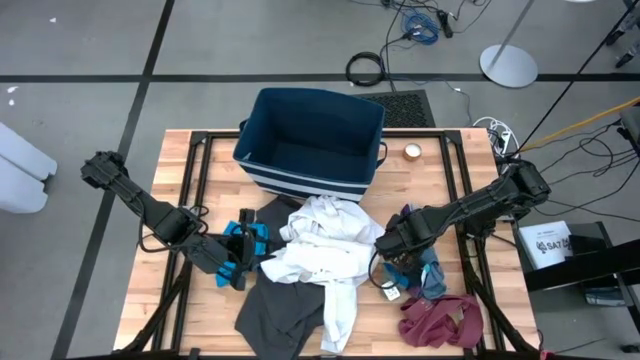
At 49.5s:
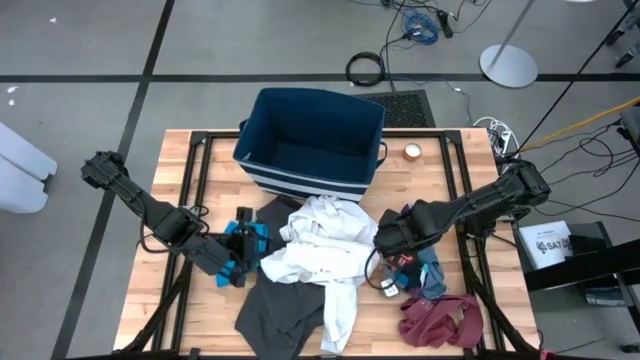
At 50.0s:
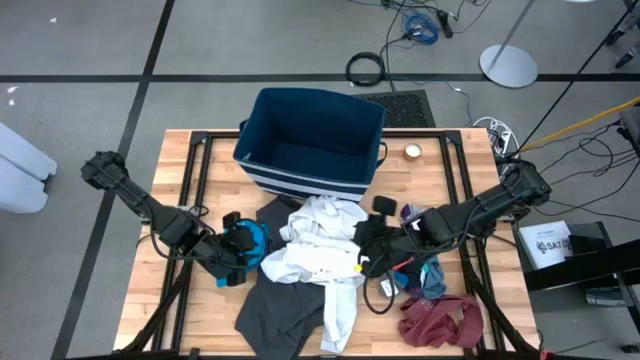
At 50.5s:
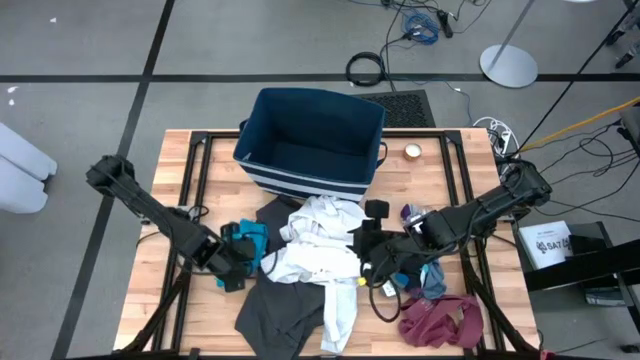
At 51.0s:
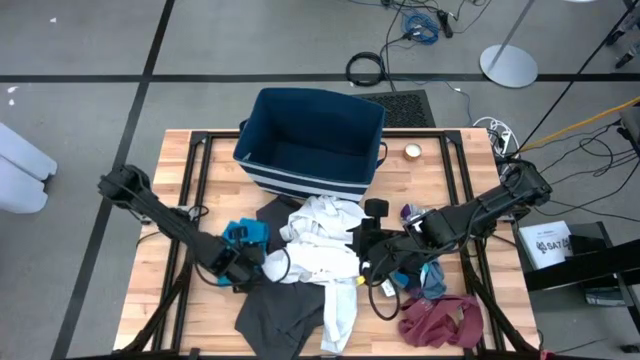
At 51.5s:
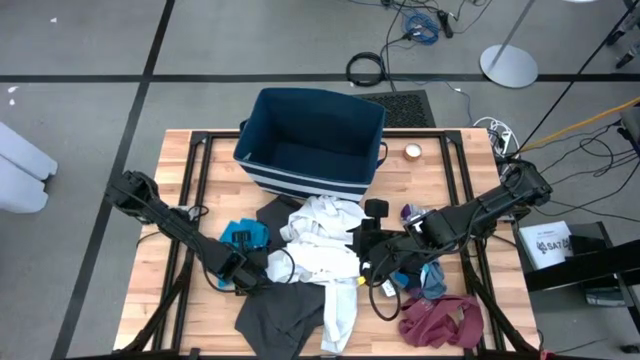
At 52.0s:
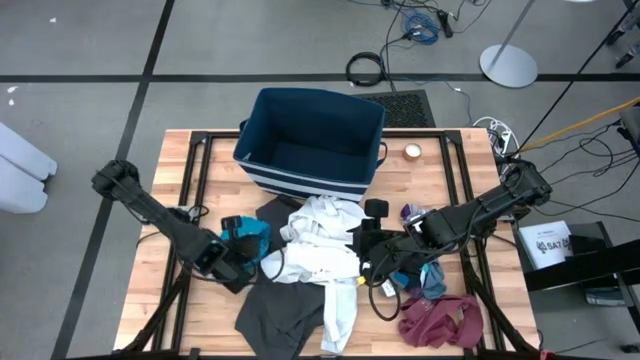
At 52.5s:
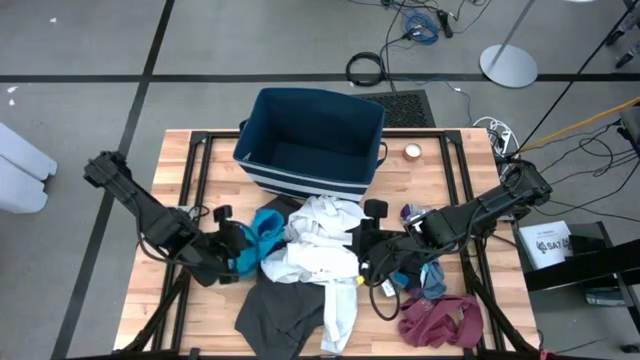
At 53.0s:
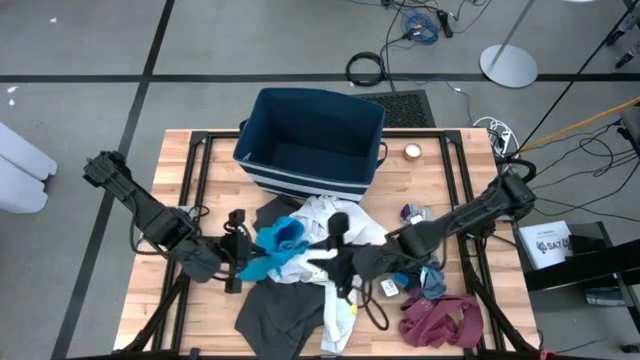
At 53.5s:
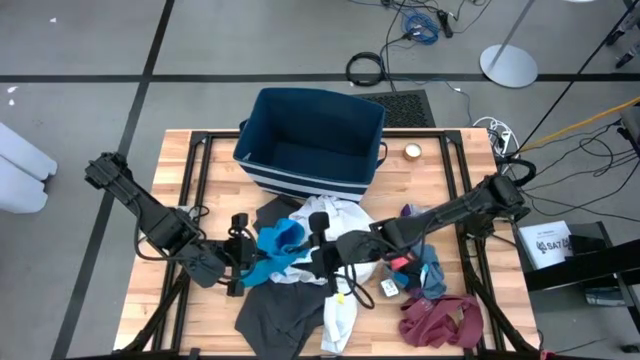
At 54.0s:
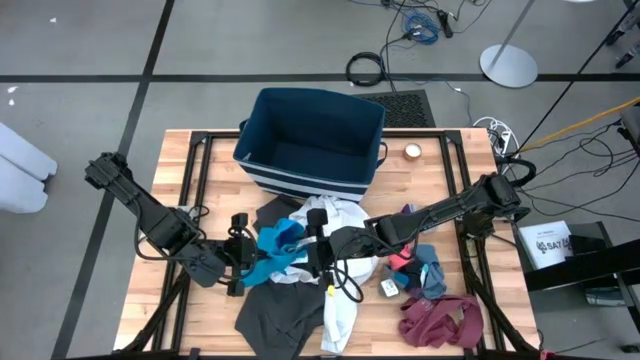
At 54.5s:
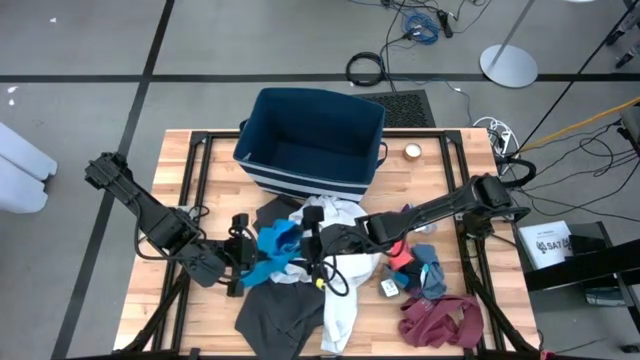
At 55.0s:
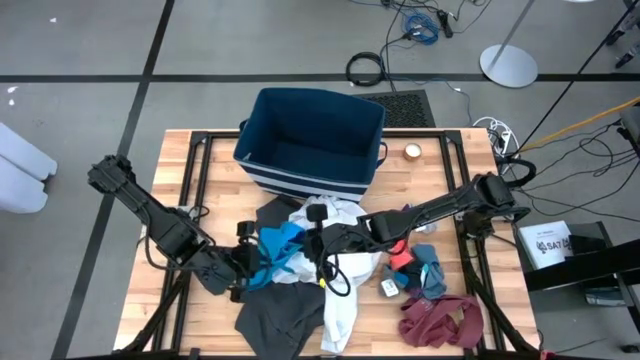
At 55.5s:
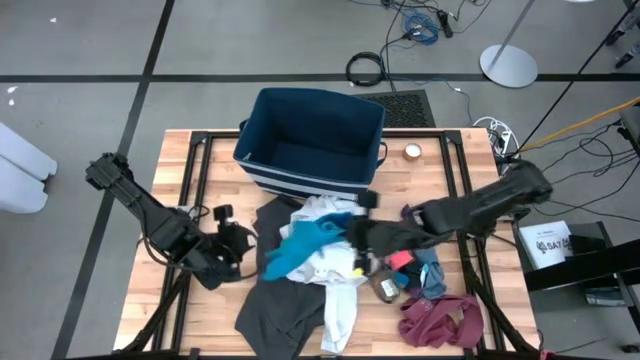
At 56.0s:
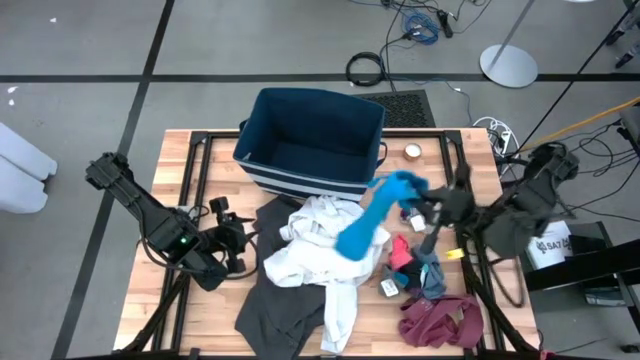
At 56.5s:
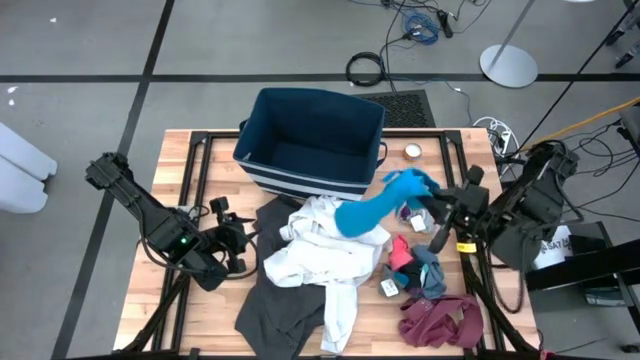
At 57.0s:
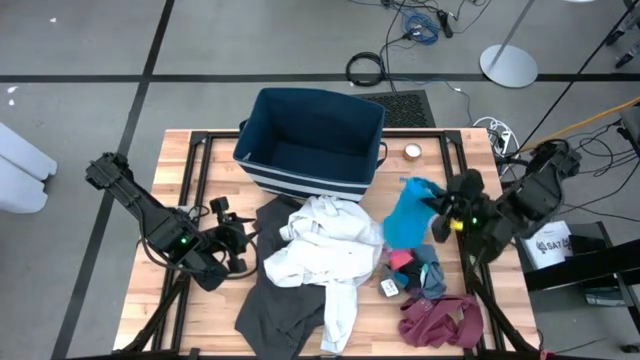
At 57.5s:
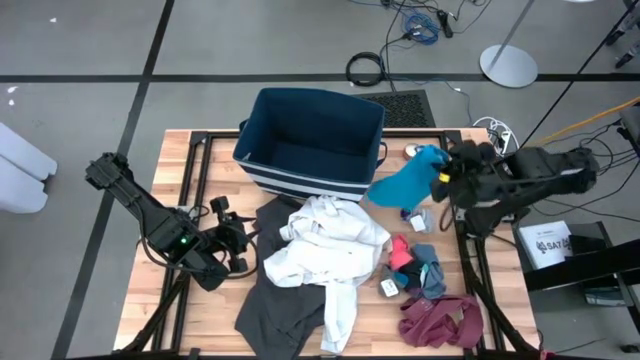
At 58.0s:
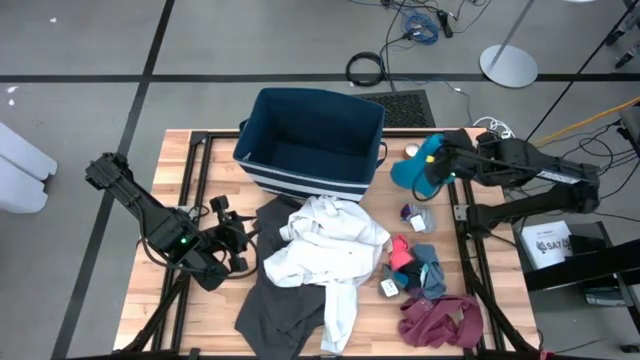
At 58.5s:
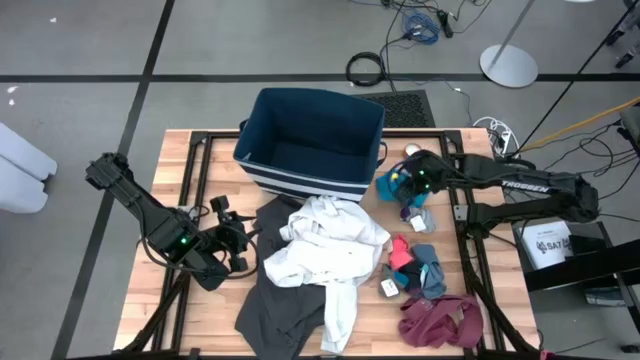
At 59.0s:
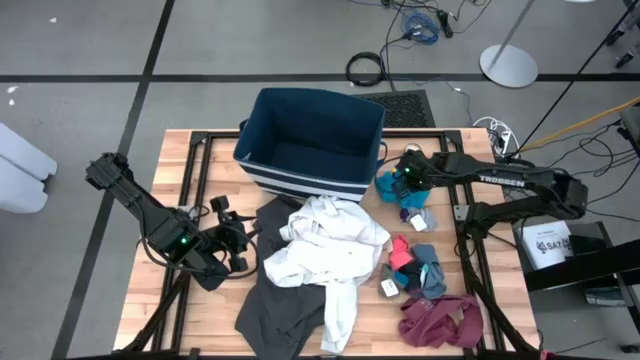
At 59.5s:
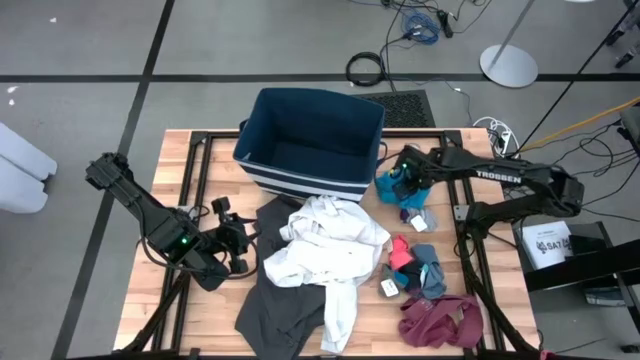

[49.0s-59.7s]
Task: Sort clothes
Move the blue short to the right of the table

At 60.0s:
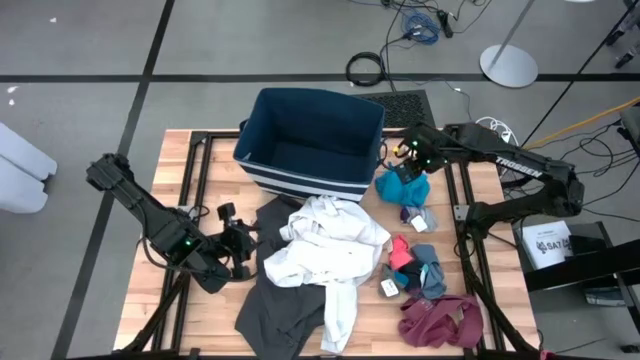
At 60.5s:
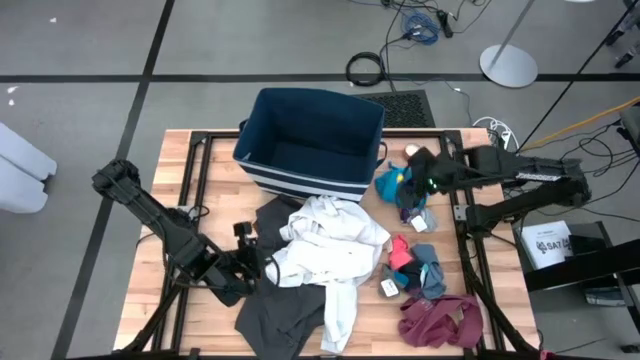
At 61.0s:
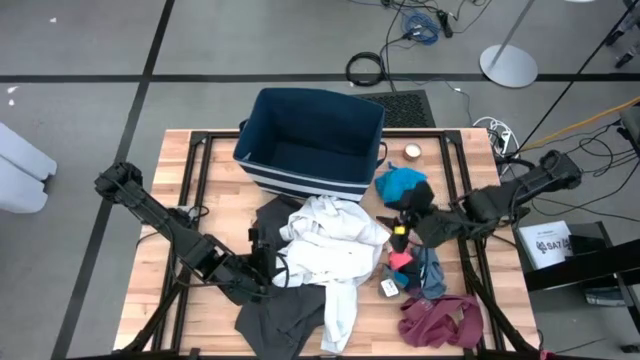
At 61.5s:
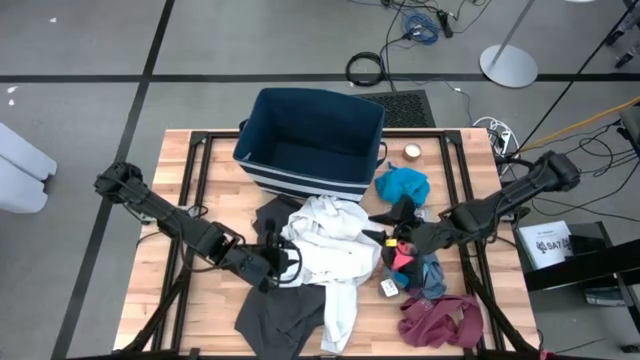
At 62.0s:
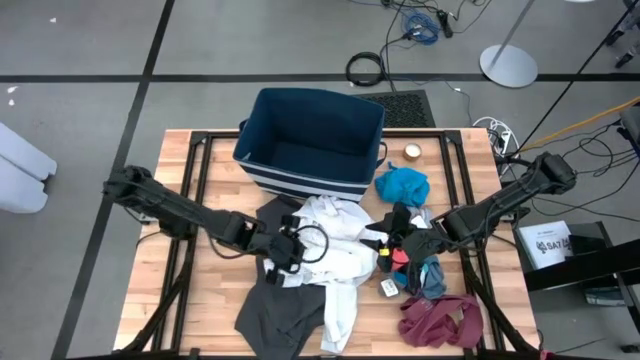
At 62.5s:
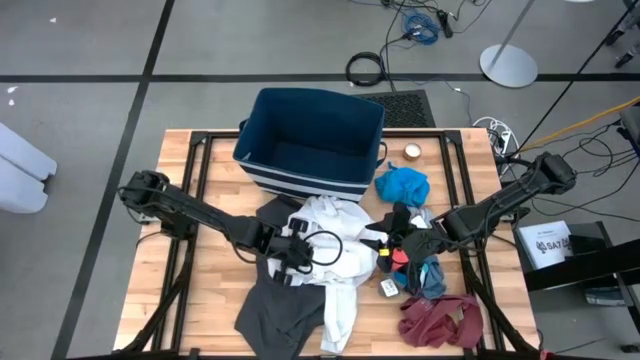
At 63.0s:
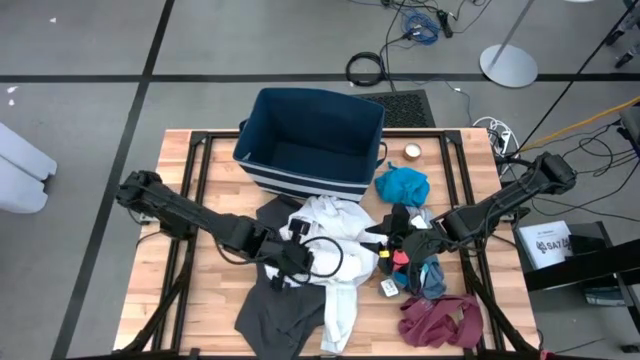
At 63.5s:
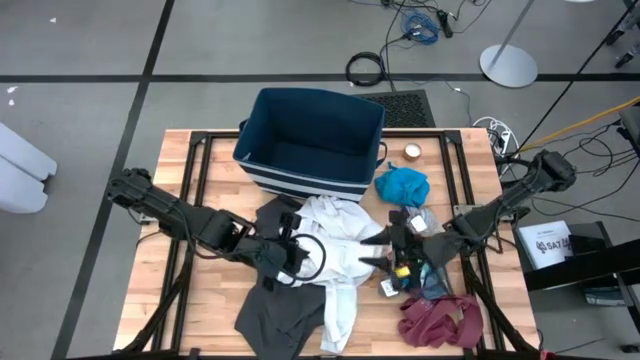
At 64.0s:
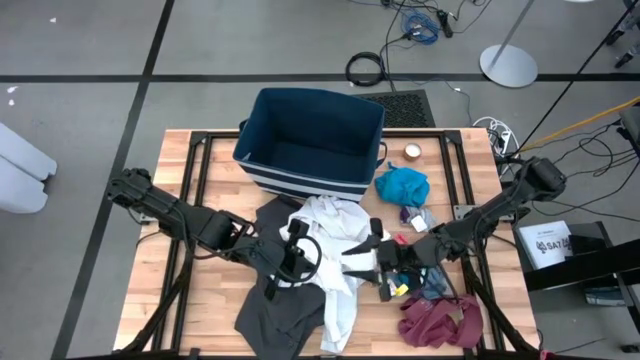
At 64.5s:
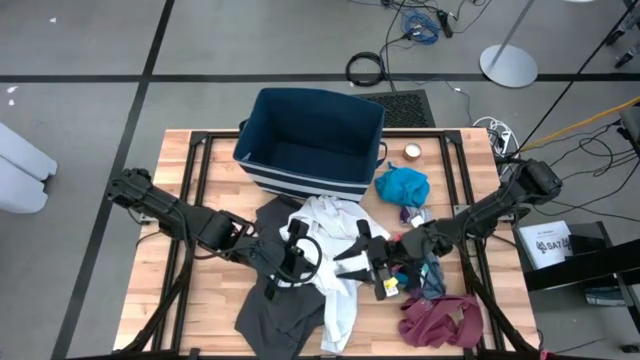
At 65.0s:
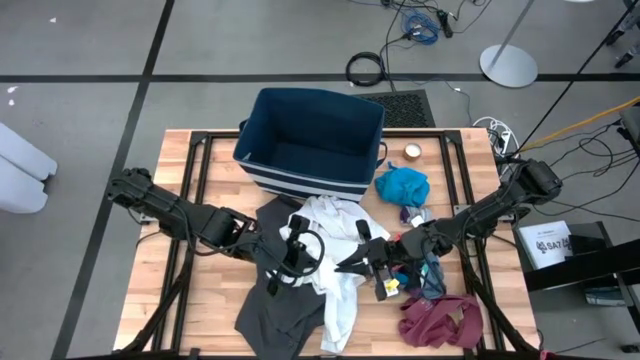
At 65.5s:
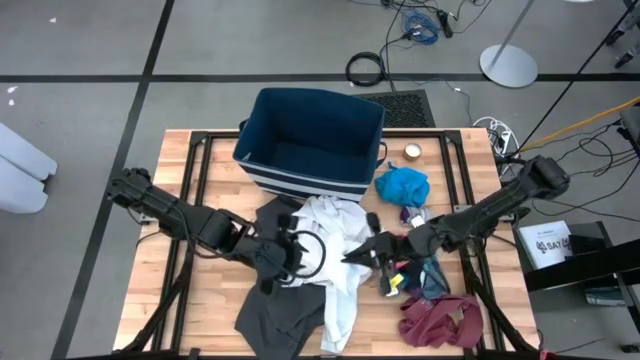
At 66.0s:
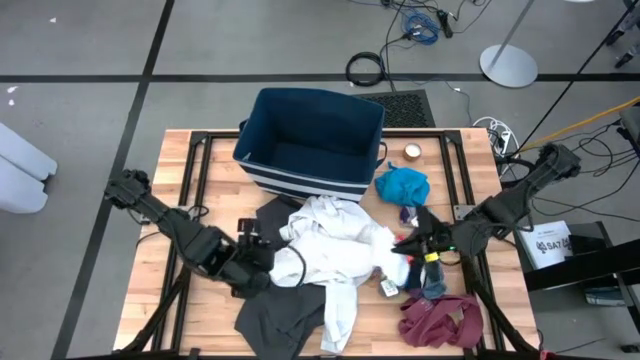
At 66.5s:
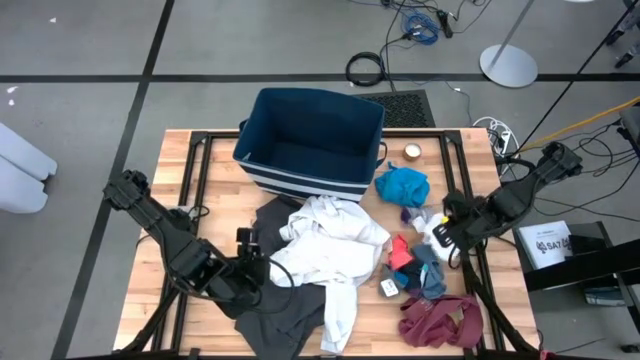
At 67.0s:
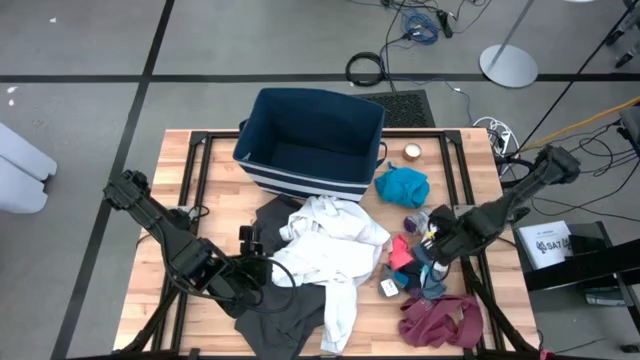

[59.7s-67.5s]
Move the white sock to the right of the table

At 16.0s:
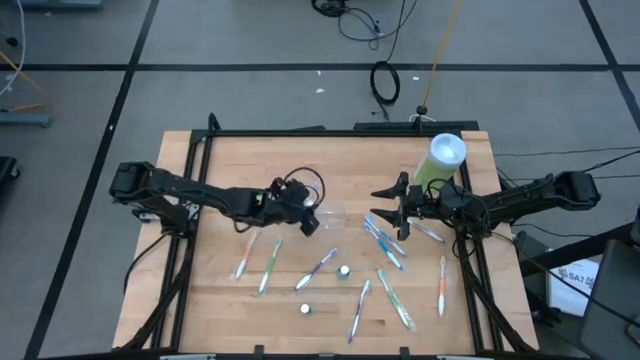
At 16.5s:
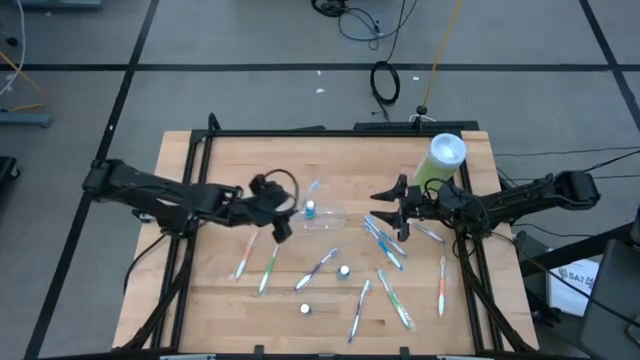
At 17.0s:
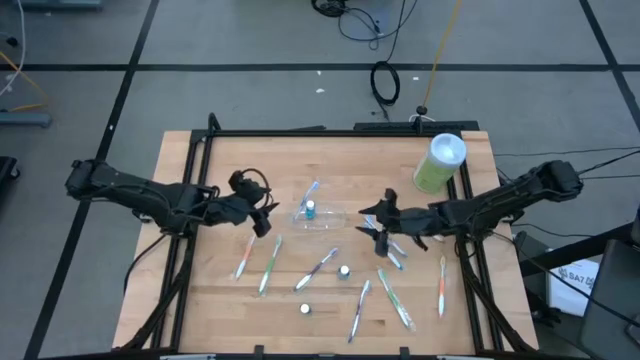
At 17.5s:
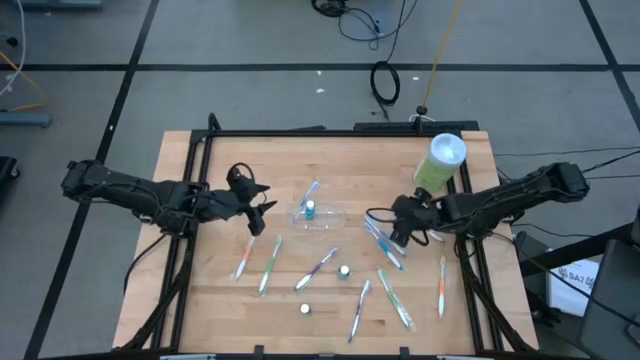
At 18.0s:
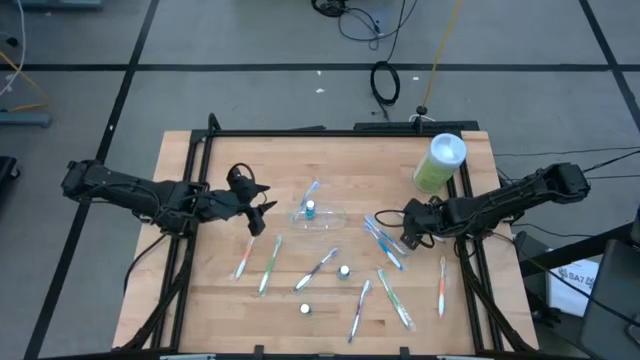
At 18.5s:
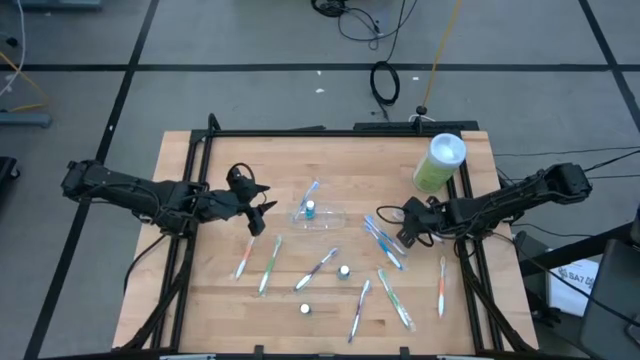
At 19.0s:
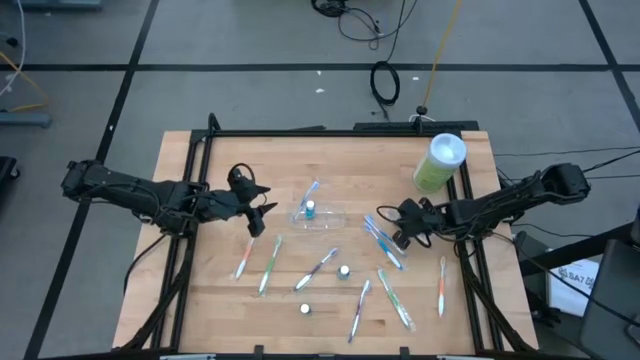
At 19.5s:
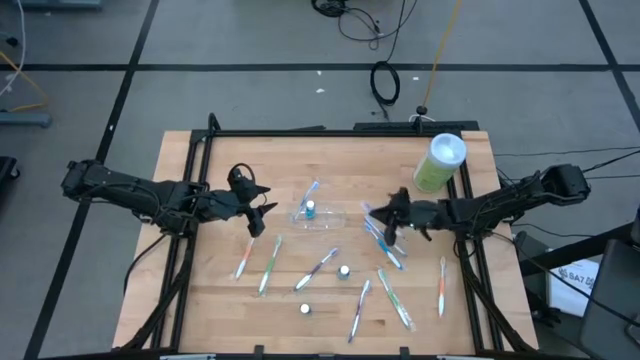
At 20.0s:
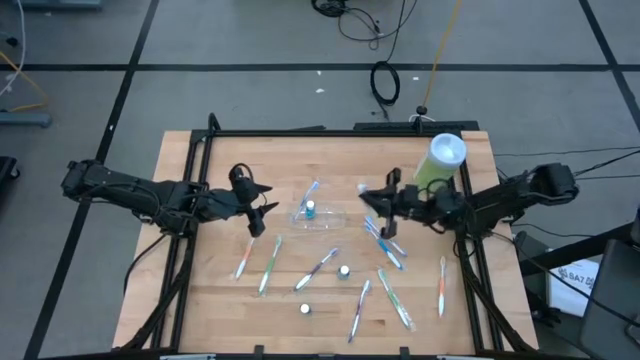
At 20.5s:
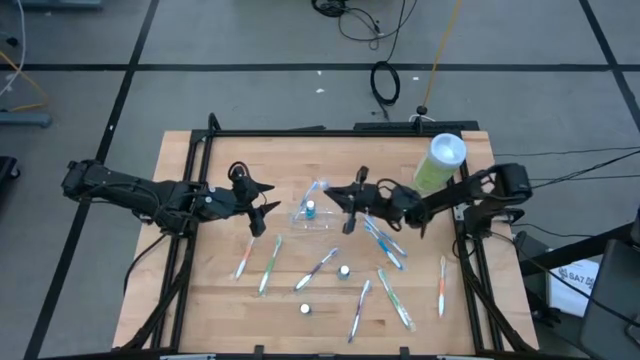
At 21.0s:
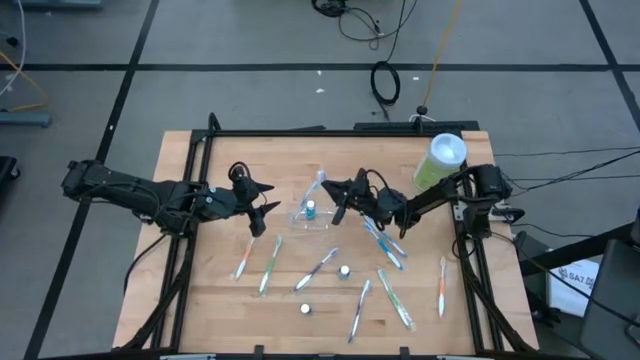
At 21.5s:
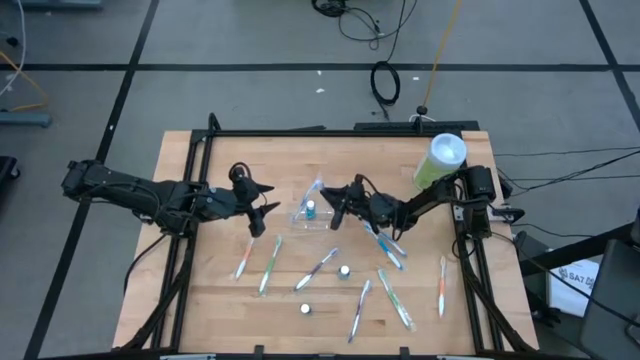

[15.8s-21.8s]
Task: Pick & Place toothbrushing station
Put the top purple toothbrush into the transparent organizer
